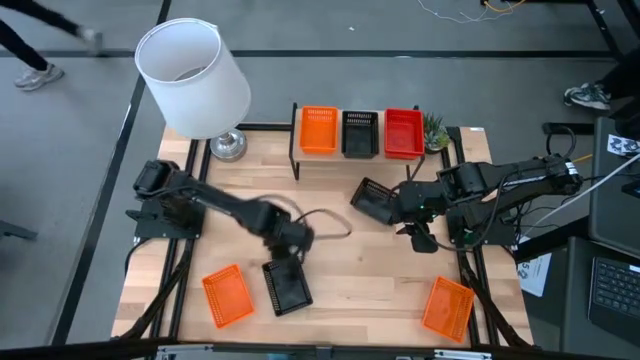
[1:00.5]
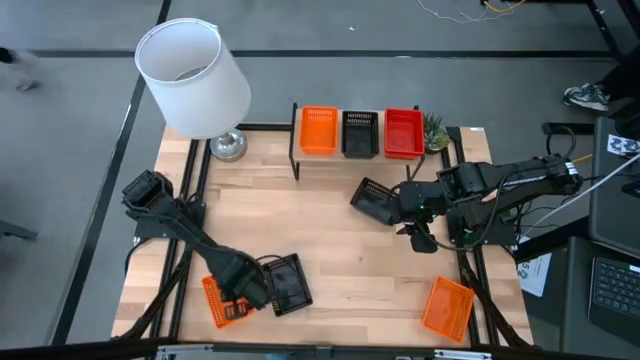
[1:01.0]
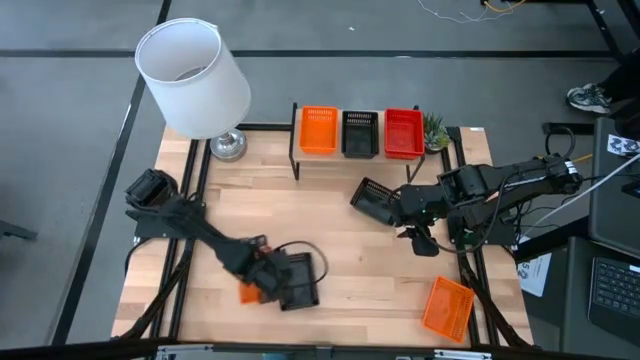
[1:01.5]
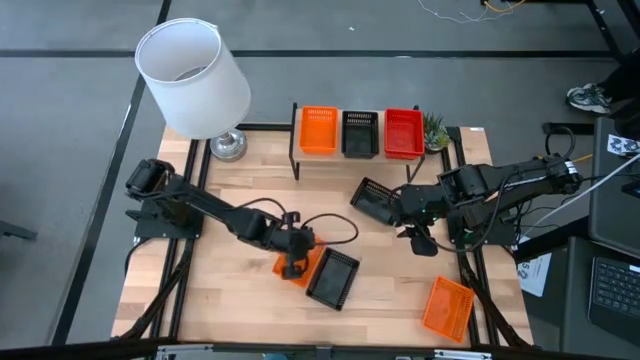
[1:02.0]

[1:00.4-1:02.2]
Task: Stack baskets on shelf by color
Move the left orange basket to the center of the table

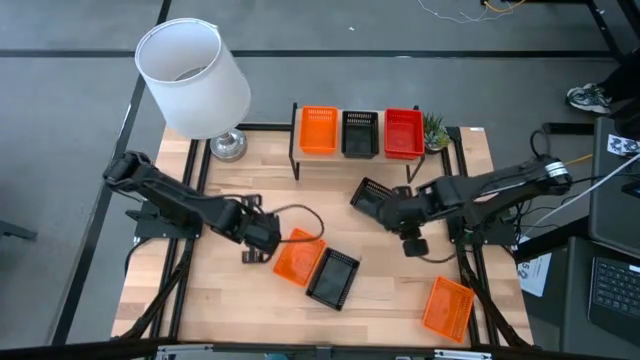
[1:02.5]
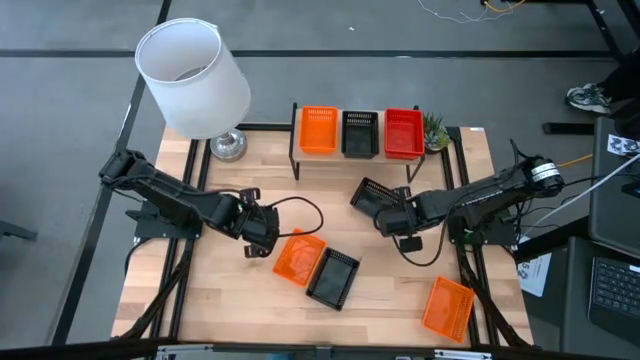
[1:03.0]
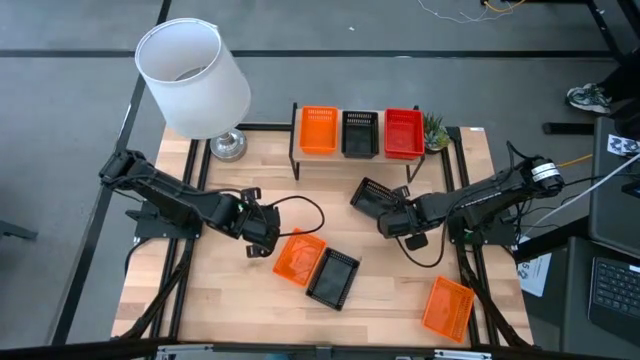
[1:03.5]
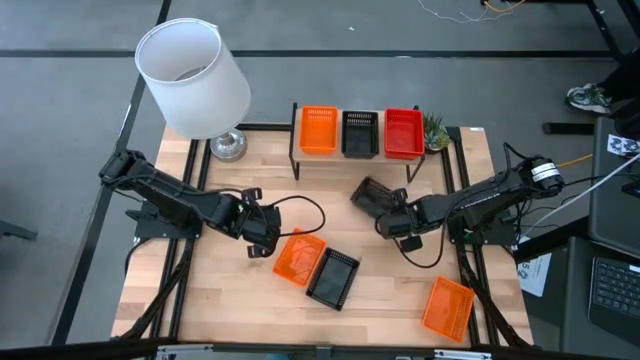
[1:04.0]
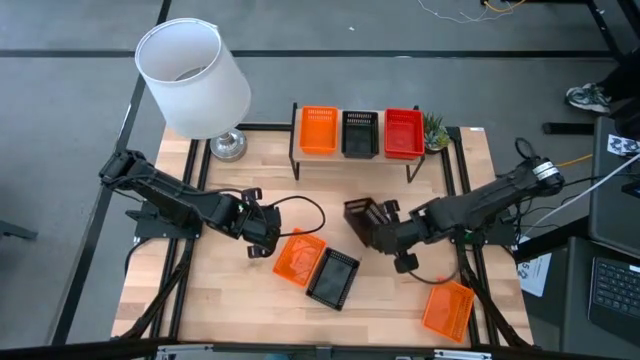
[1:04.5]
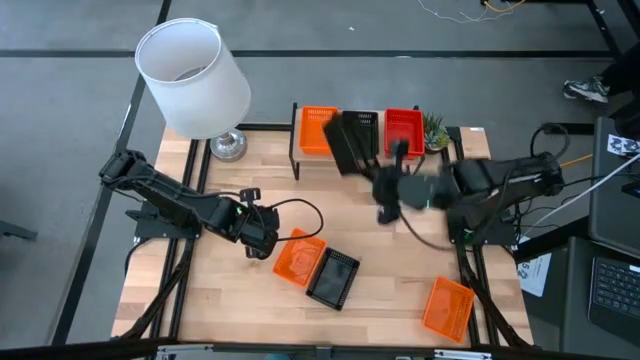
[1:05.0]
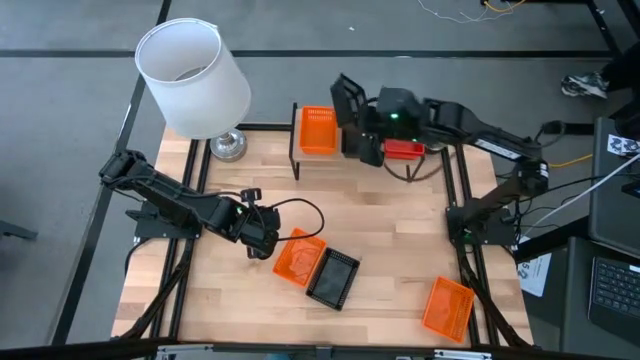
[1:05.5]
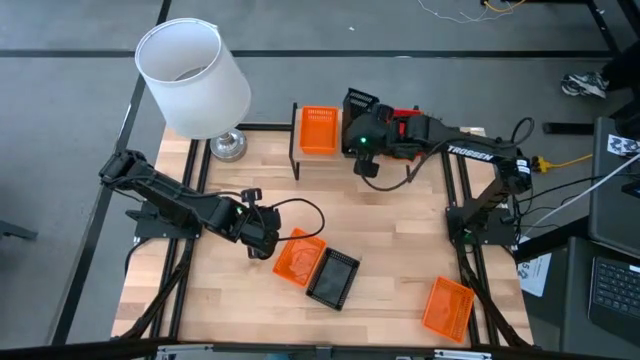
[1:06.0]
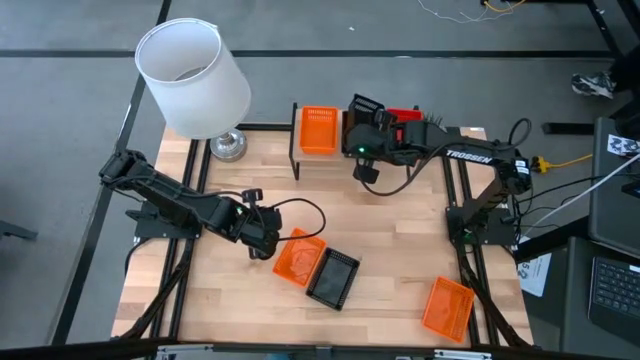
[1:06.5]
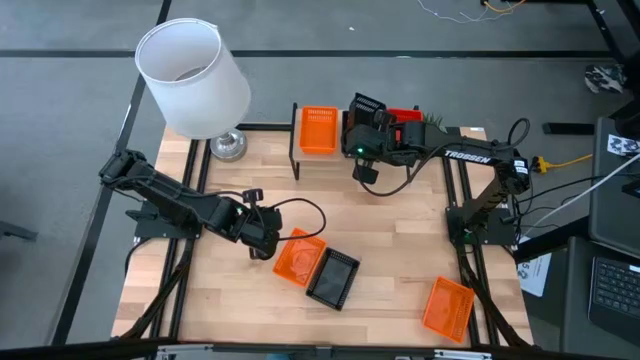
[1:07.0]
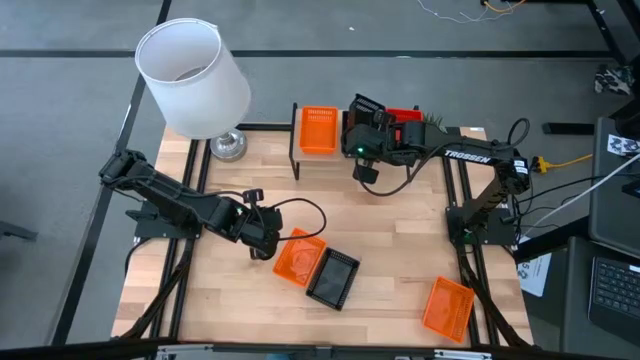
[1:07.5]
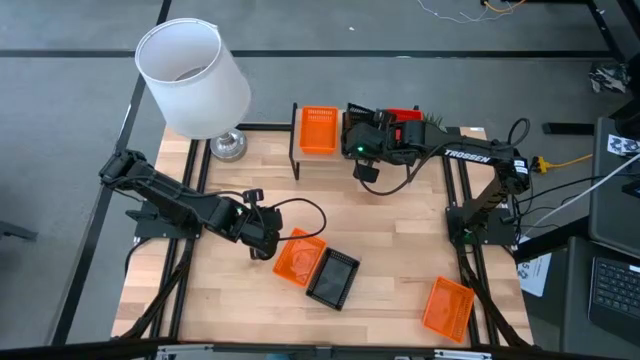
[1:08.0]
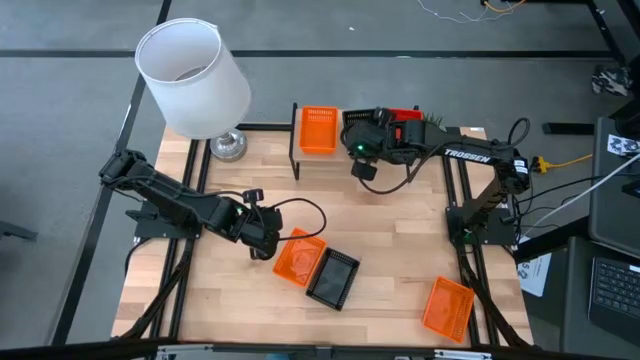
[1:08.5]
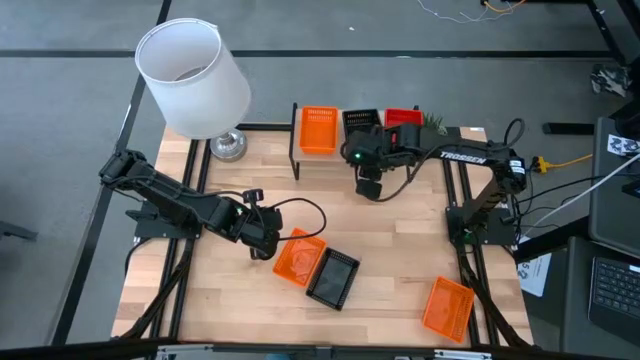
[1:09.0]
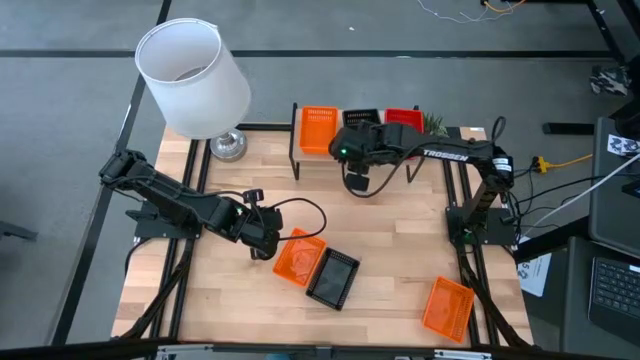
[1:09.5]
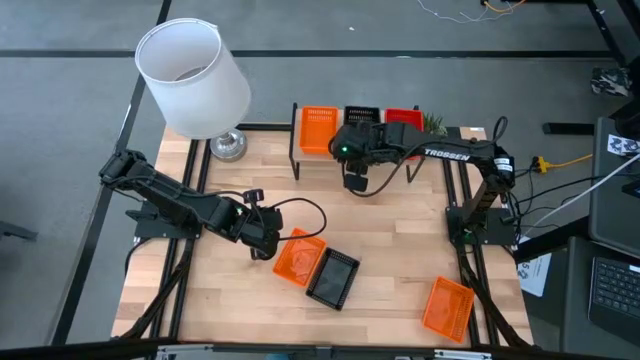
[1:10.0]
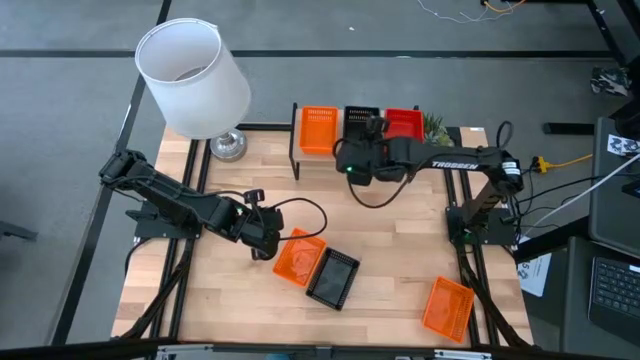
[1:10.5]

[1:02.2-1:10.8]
Stack the top black basket on the other black basket on the shelf

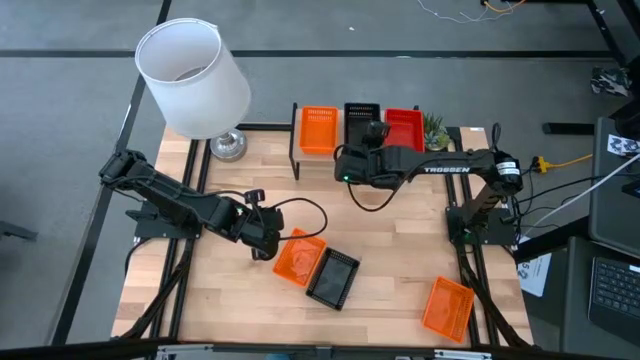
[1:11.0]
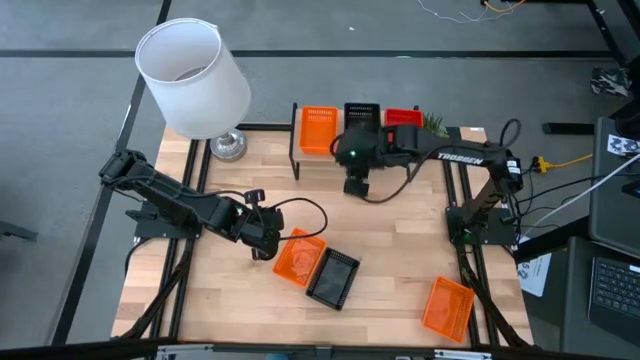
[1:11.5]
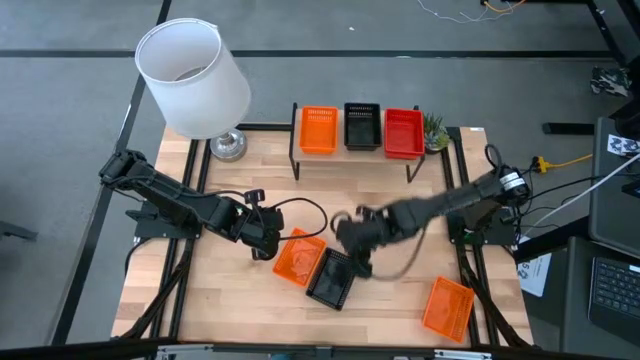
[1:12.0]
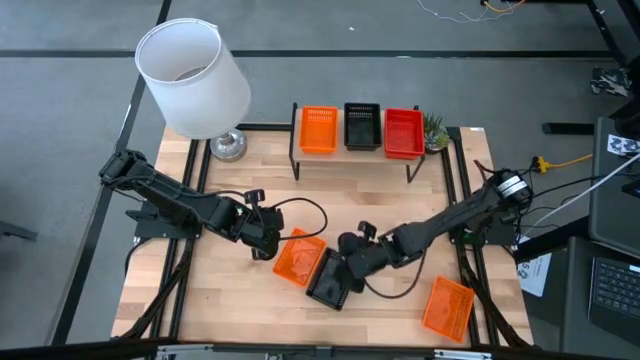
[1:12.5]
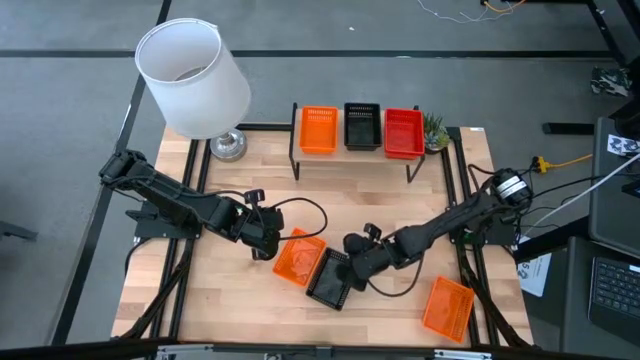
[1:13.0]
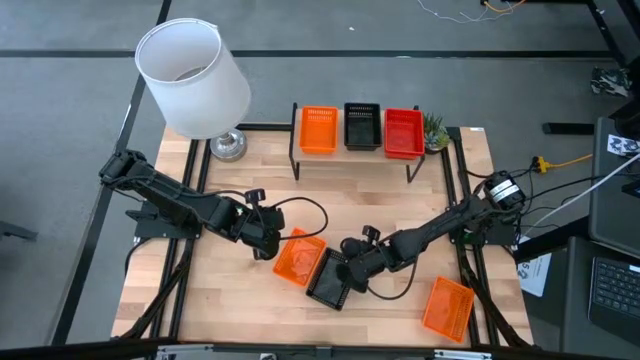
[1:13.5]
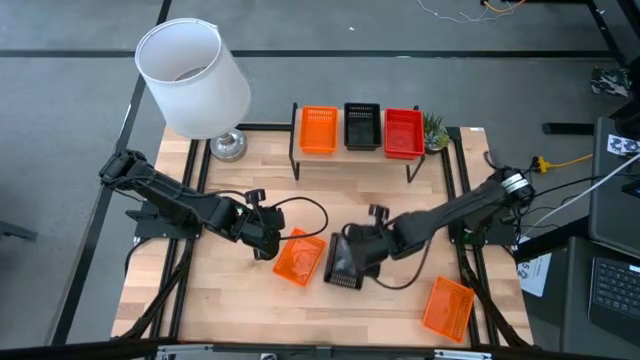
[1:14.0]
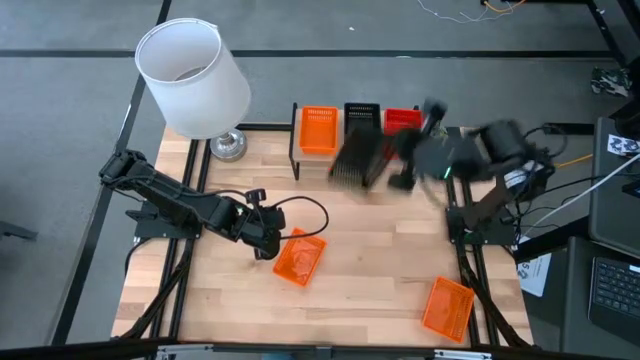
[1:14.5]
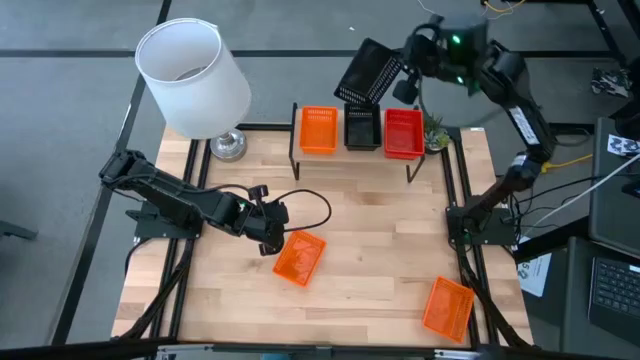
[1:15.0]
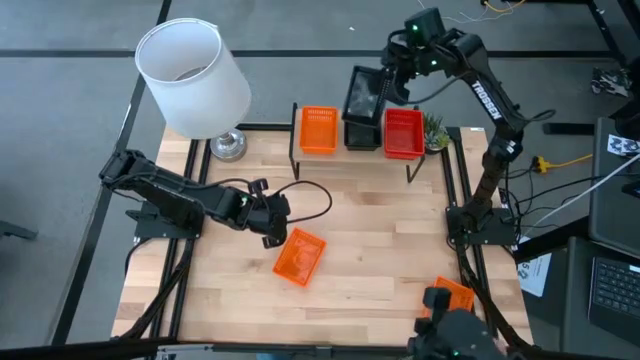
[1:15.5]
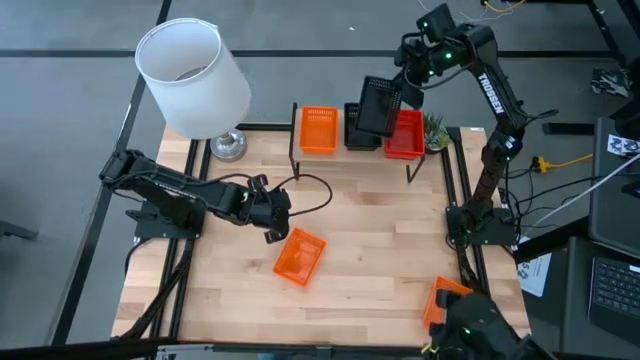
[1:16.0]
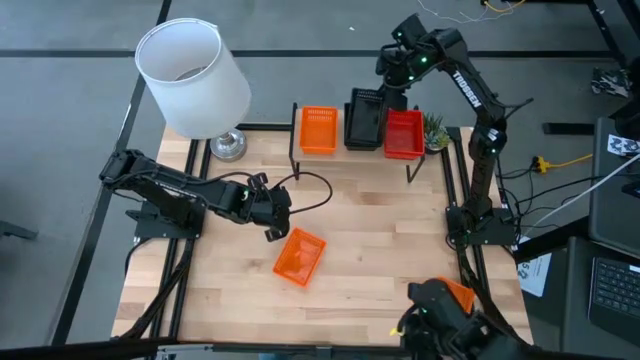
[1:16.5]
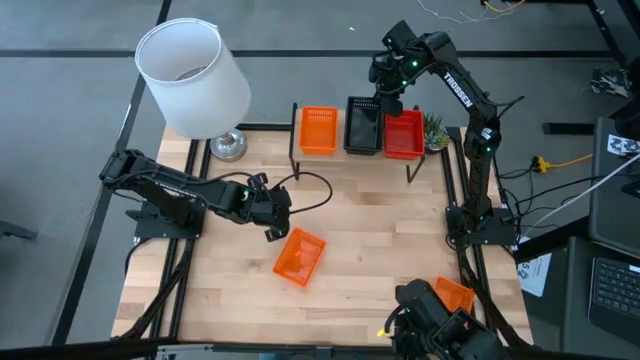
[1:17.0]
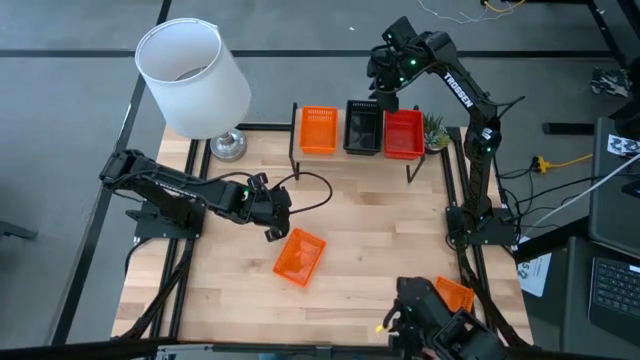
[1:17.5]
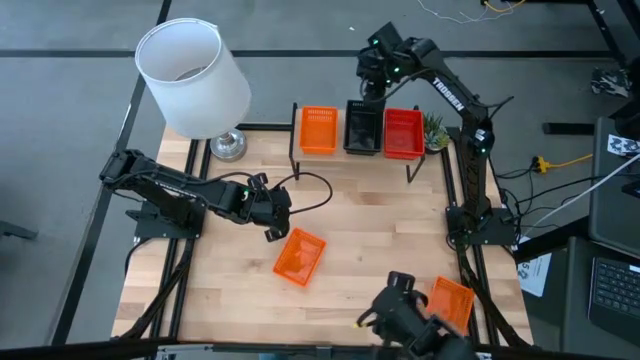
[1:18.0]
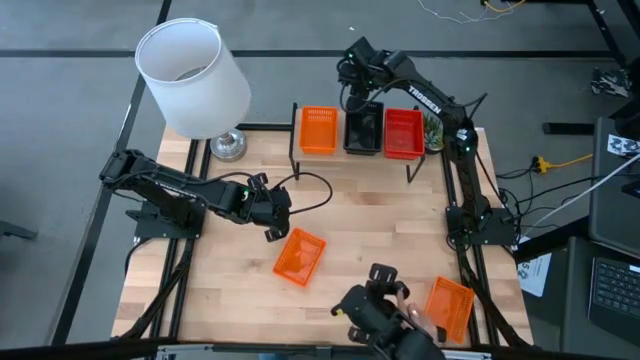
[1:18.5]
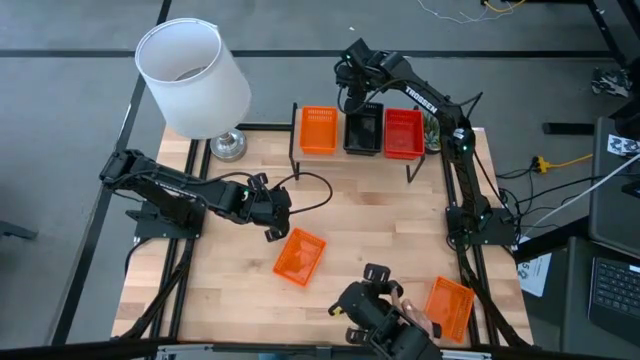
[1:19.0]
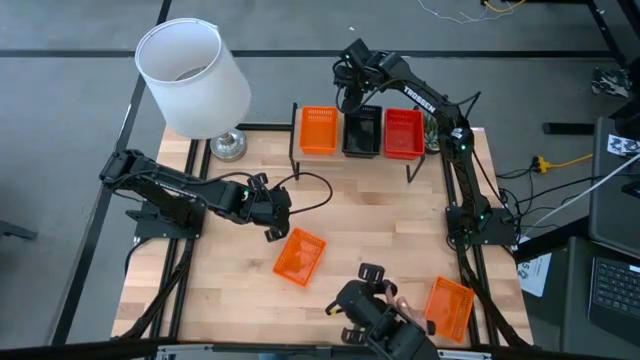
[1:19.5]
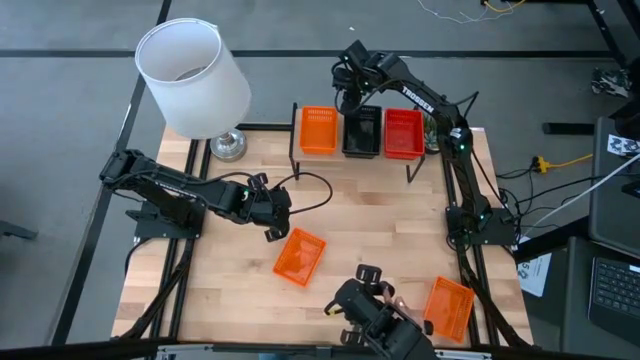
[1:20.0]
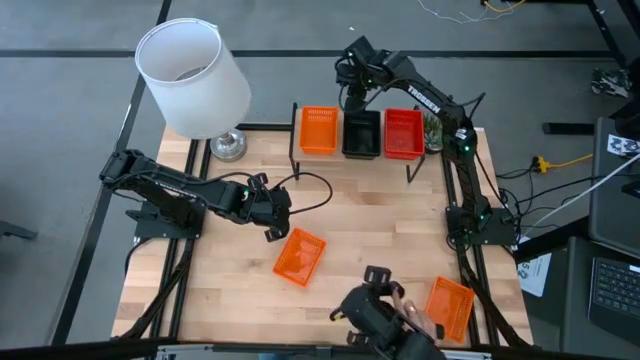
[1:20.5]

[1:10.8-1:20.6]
Stack the black basket on the other black basket on the shelf

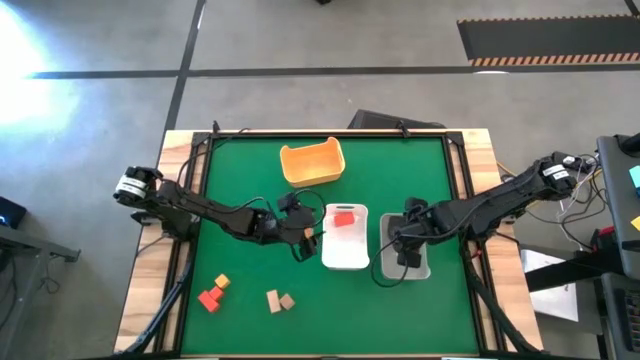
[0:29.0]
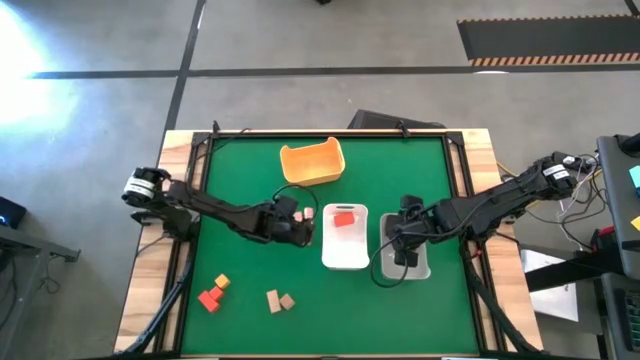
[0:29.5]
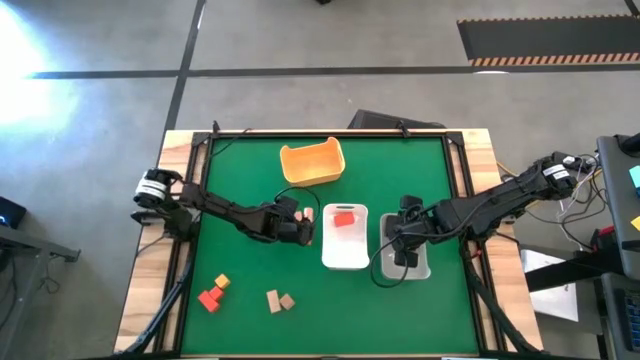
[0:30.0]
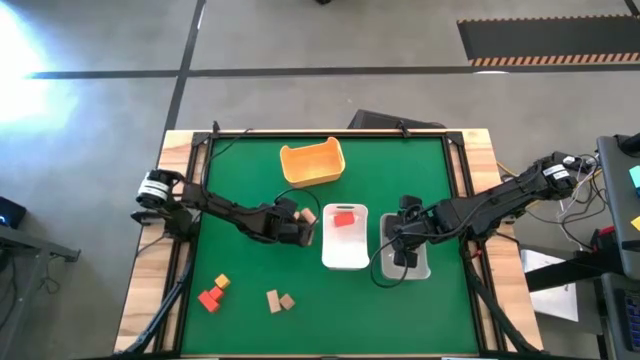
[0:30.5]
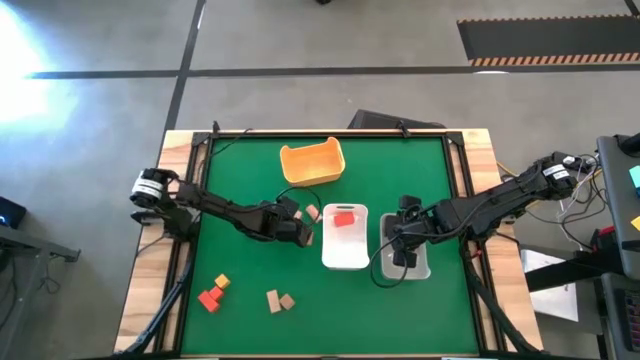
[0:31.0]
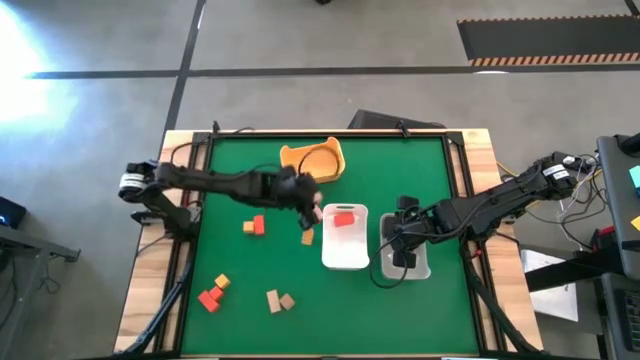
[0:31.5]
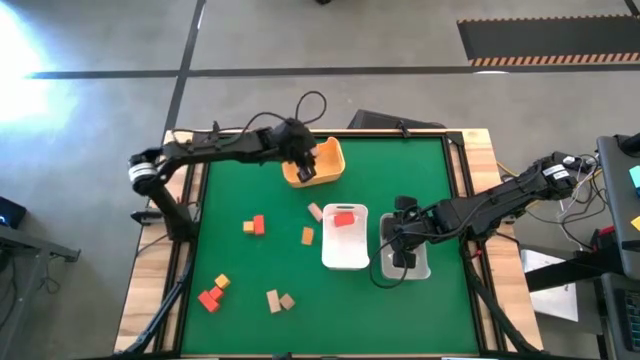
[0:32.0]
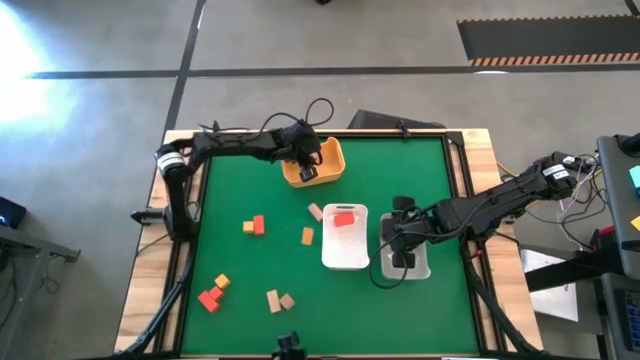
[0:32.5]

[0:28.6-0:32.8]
Task: Sort & place blocks by color
Put the brown block into the yellow bin
